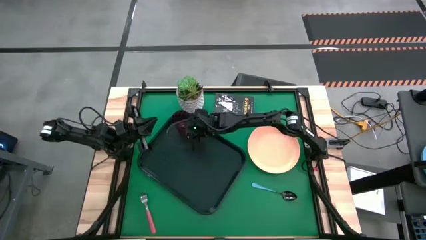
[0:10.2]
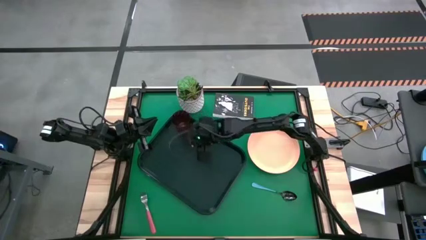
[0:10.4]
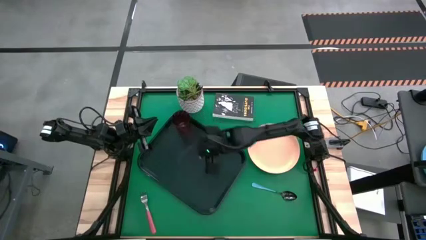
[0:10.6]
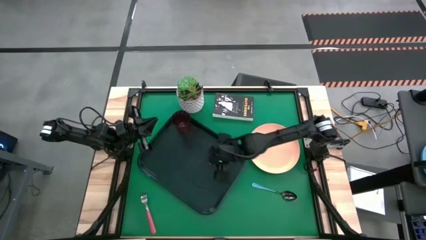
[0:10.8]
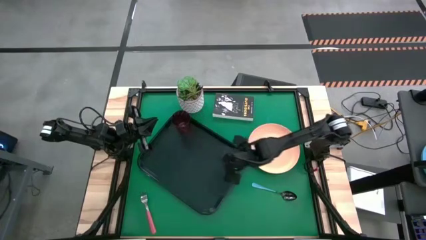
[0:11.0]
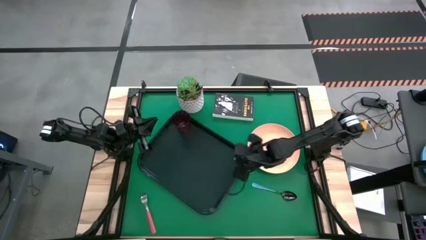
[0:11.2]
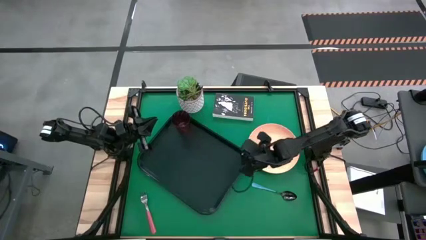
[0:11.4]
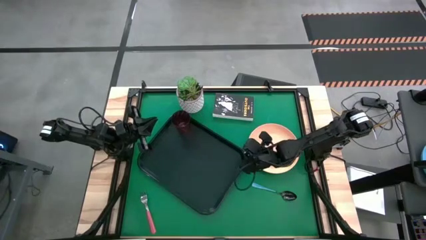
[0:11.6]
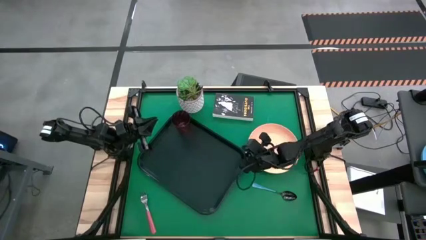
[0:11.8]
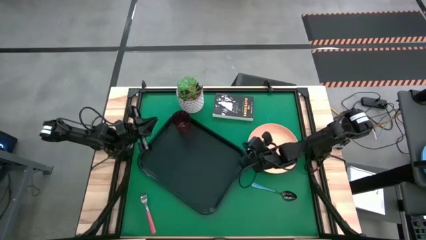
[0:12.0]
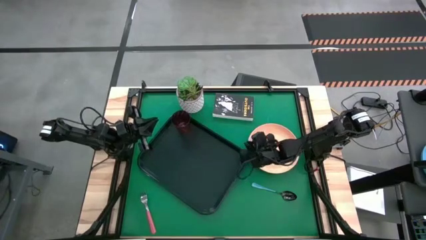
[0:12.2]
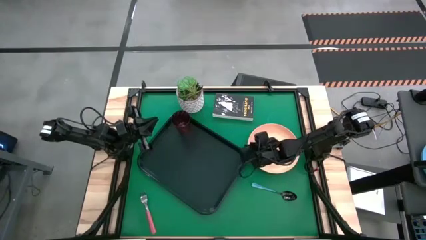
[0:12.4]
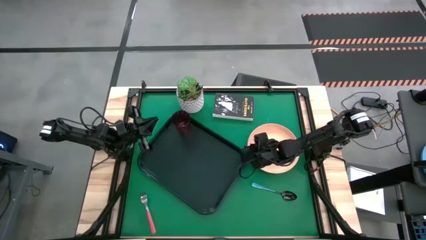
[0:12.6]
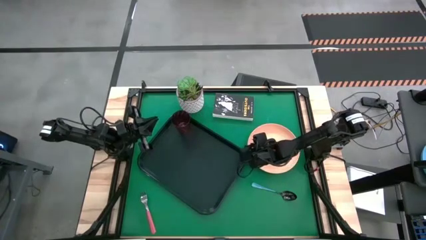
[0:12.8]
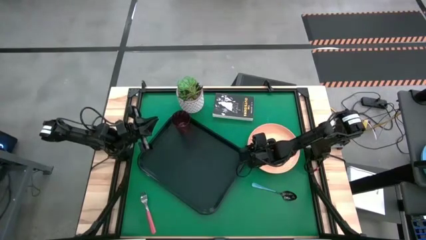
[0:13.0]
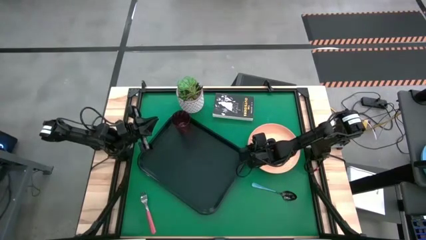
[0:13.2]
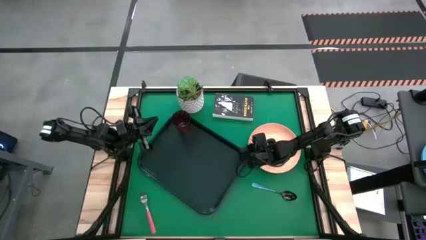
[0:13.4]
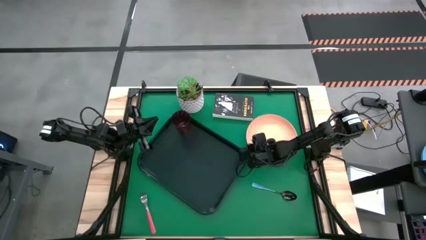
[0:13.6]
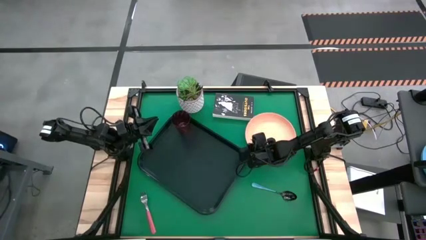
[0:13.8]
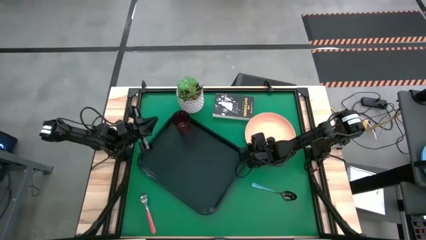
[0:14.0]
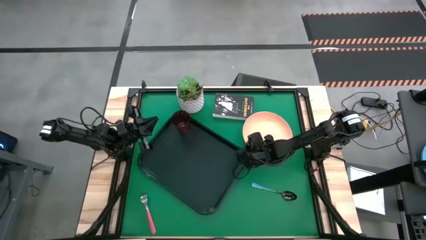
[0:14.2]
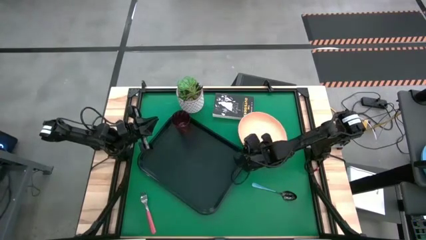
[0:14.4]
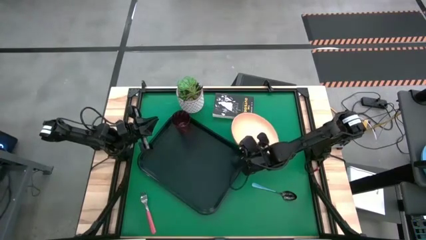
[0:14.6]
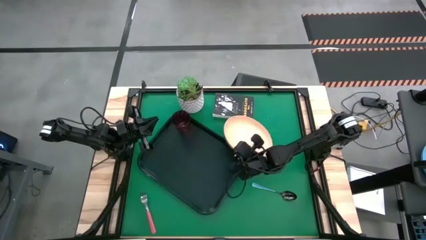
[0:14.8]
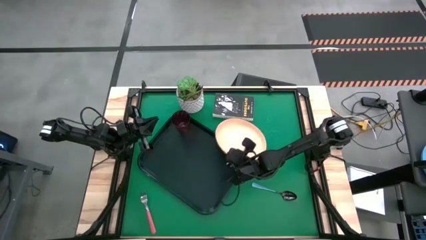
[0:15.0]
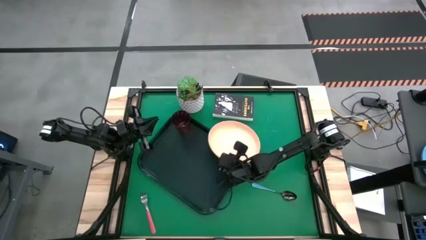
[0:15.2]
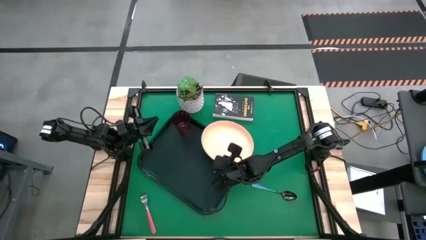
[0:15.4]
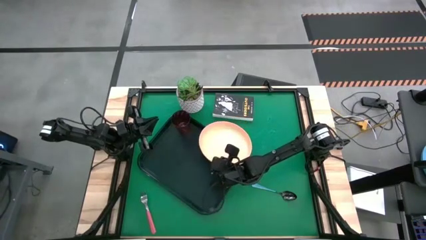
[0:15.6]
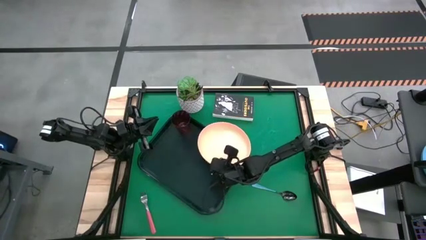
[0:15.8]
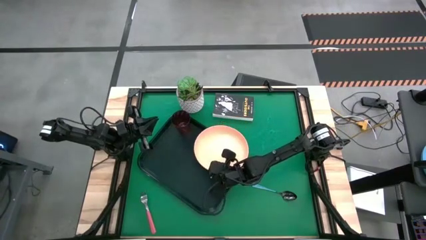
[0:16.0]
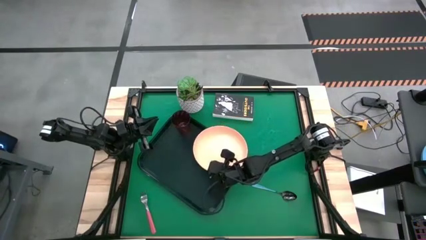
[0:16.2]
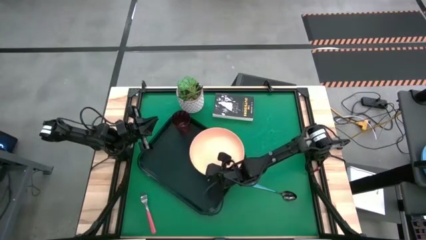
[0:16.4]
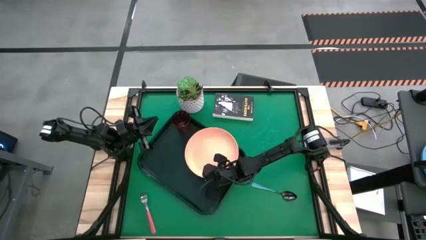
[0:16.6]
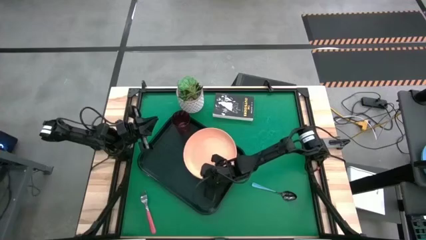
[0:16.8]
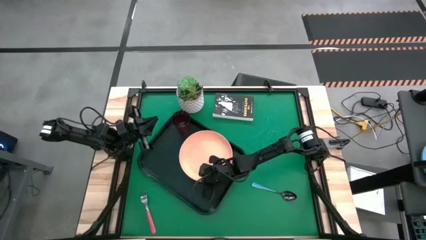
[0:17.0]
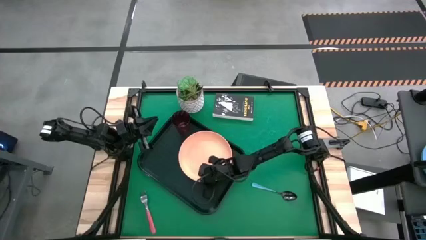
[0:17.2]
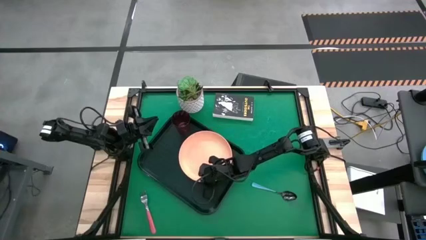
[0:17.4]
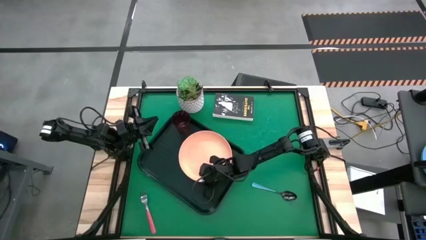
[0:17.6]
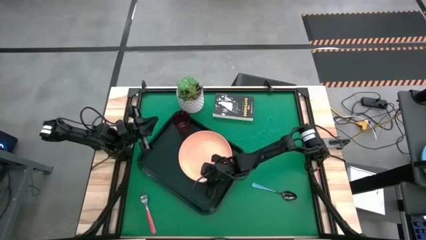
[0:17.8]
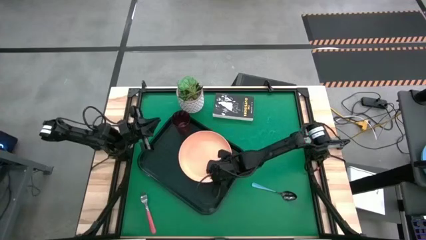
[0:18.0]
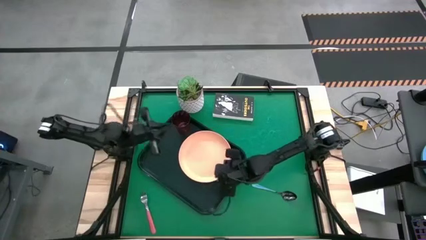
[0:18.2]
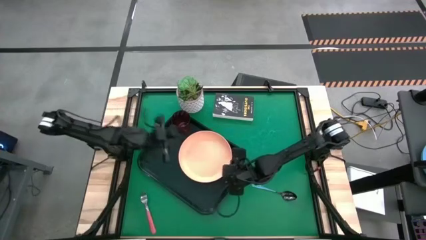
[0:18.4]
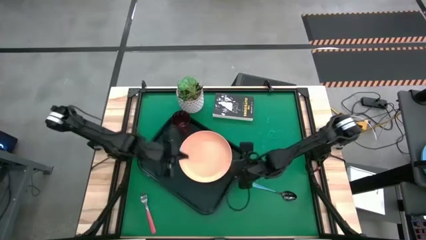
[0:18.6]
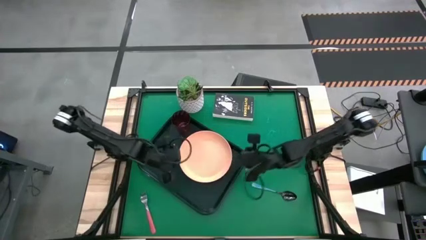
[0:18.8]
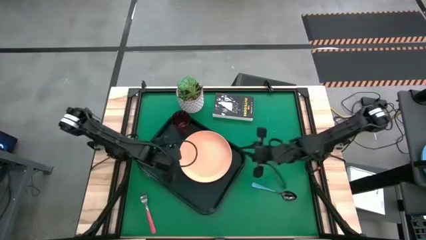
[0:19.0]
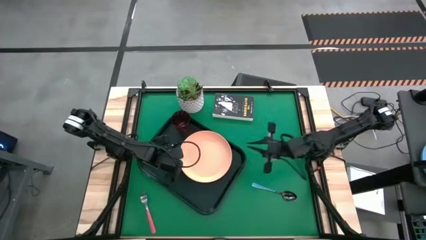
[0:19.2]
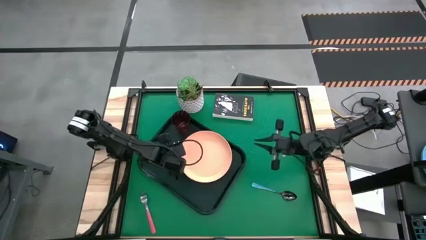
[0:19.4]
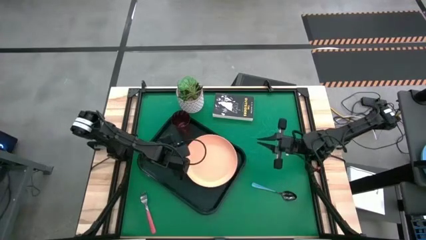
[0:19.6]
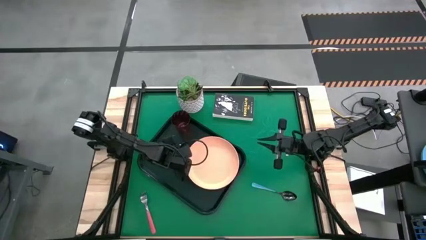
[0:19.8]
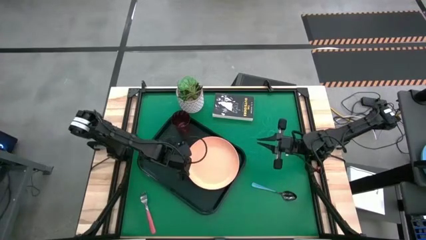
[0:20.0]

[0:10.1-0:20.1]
Task: Pick and place plate/cup/fork/spoon on tray
Put the light orange plate on the black tray to the right of the red cup

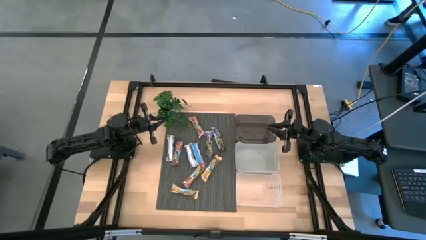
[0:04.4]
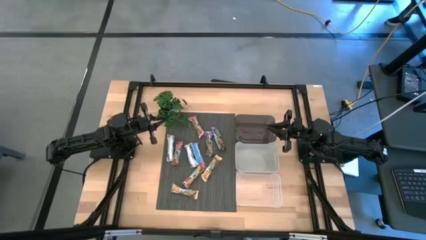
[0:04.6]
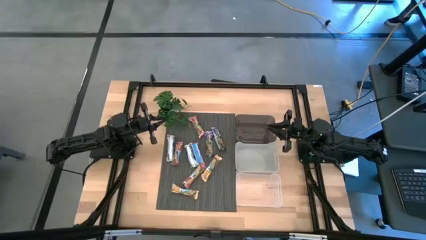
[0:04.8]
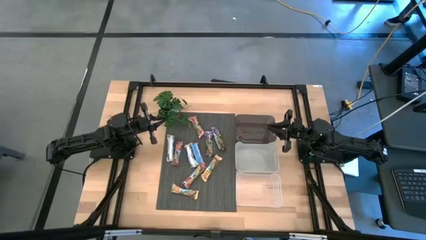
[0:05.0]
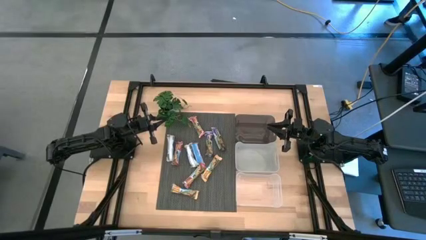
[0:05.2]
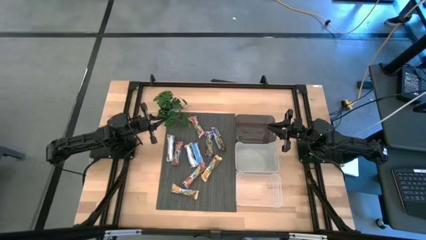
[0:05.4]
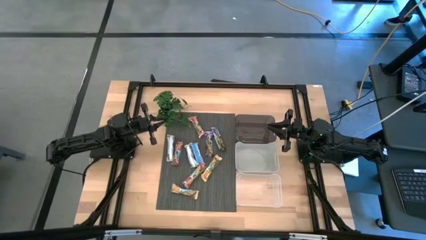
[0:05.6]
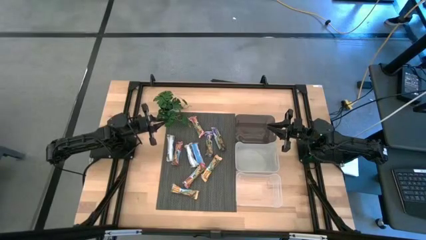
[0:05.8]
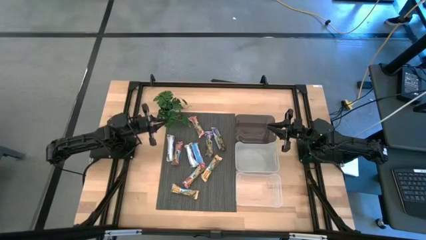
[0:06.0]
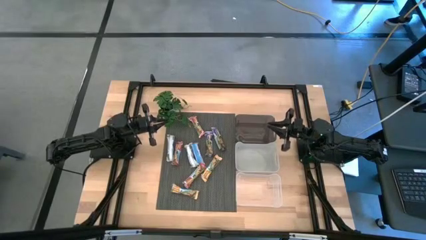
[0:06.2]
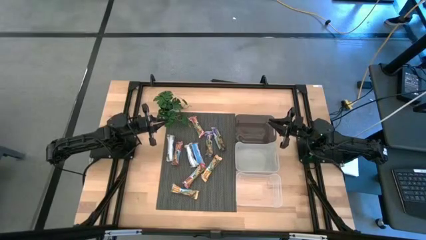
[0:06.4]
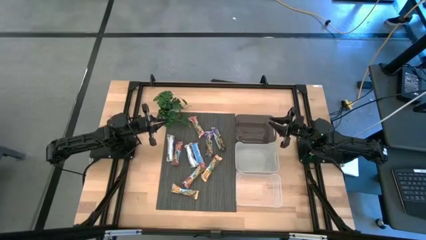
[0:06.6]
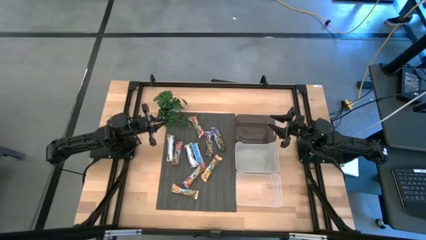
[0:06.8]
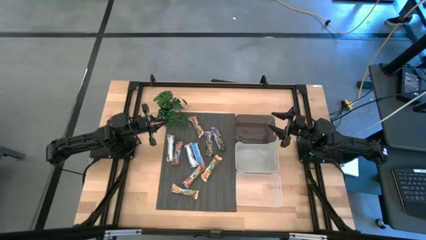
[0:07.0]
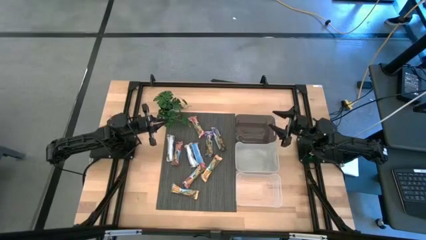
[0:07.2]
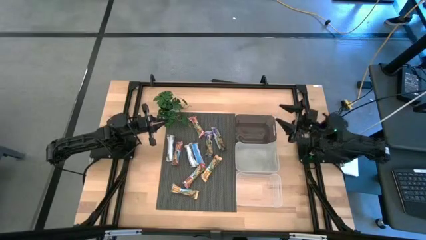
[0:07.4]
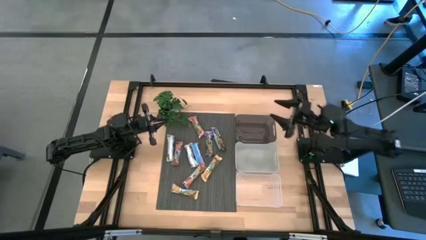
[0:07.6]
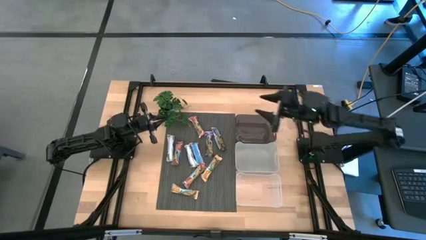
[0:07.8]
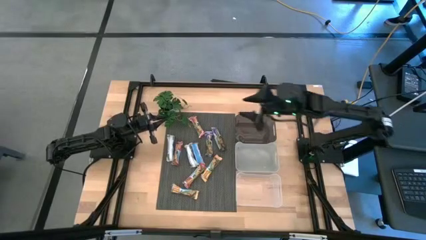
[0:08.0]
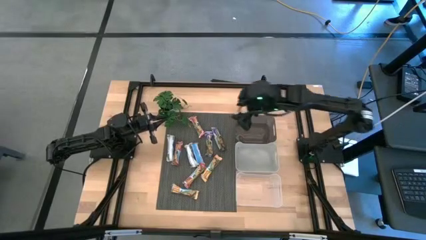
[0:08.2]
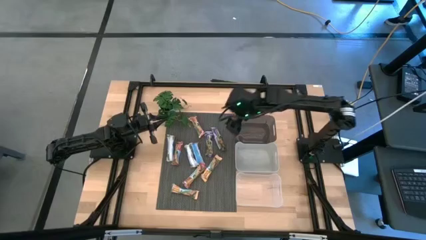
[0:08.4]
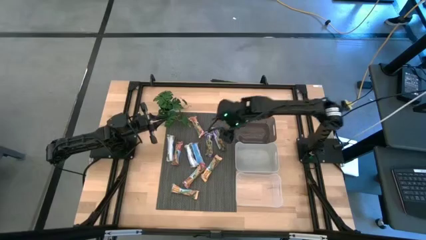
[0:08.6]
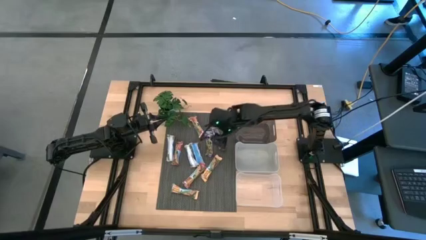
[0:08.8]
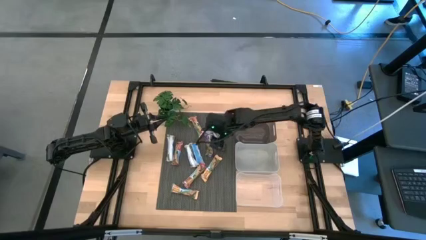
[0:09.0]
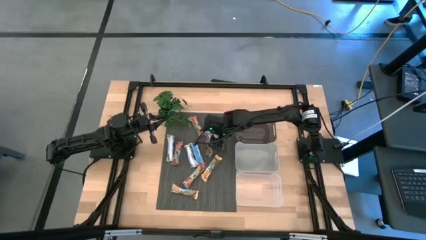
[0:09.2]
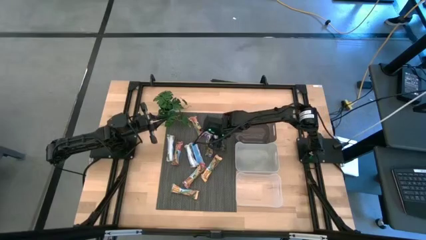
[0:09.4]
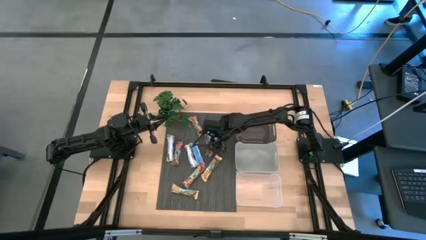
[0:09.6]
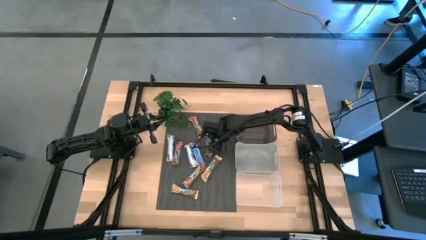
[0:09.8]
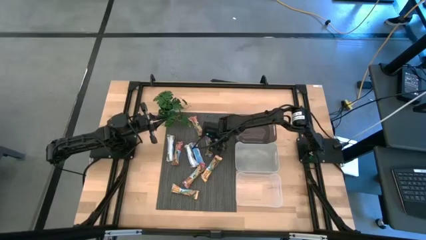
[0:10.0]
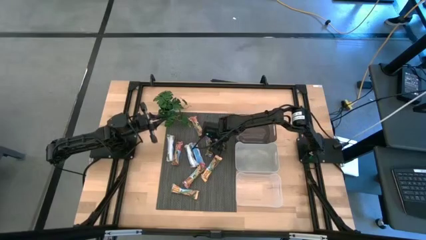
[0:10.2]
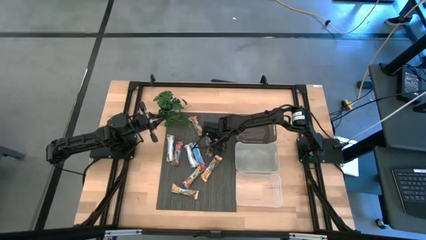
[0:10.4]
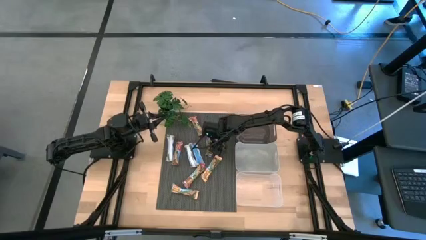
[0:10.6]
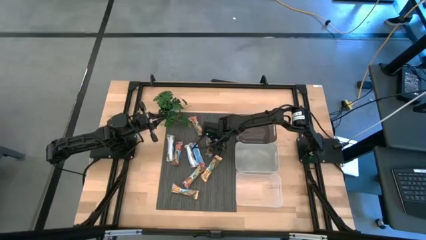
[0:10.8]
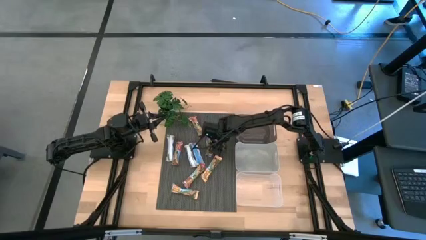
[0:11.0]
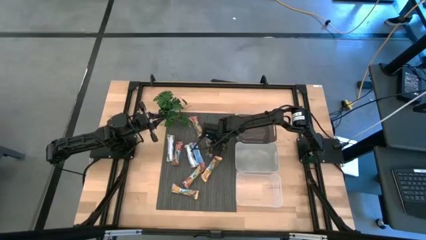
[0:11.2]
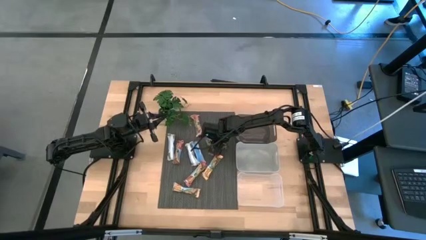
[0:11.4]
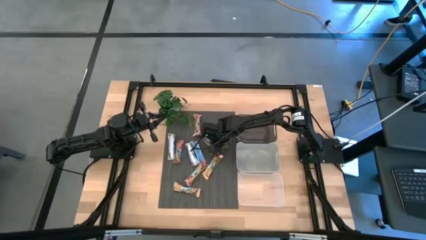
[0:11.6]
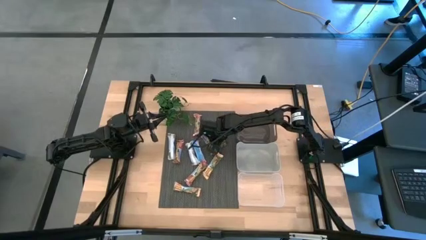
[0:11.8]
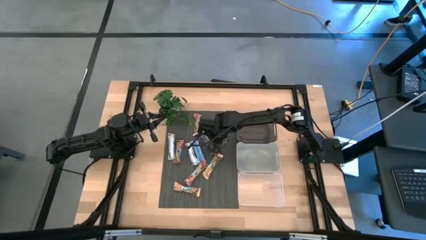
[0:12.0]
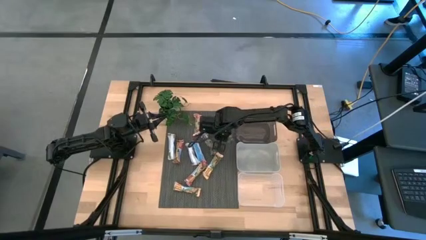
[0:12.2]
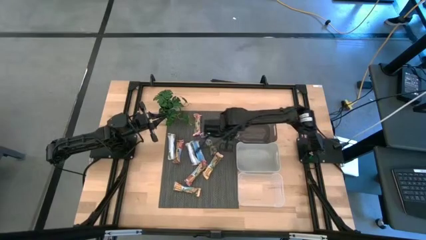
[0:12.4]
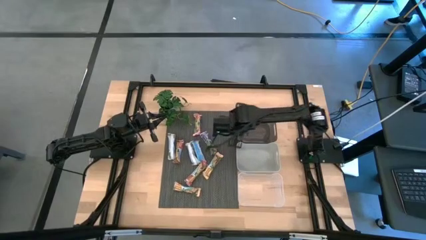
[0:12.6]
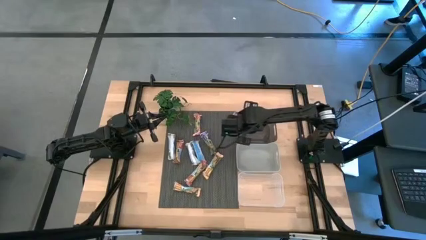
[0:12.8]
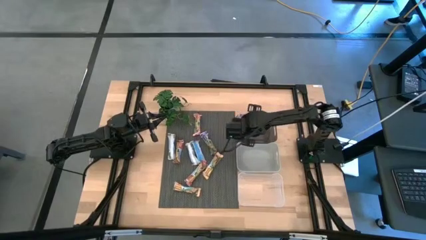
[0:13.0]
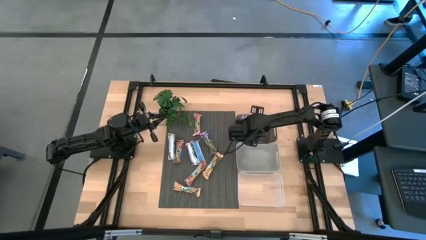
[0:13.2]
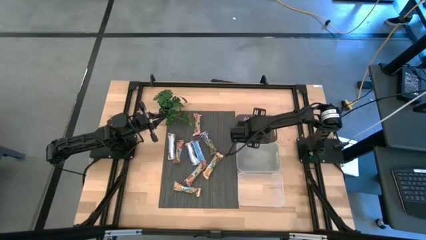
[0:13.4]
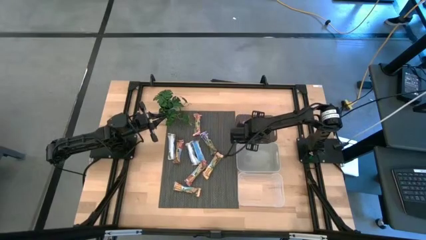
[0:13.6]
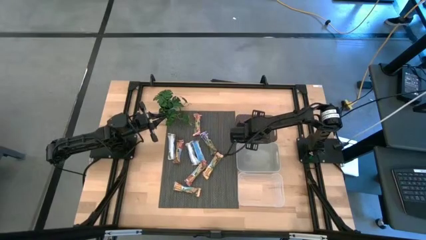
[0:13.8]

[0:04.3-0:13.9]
Task: Pick and place Granola Bars by type
Put the purple granola bar into the black bin
